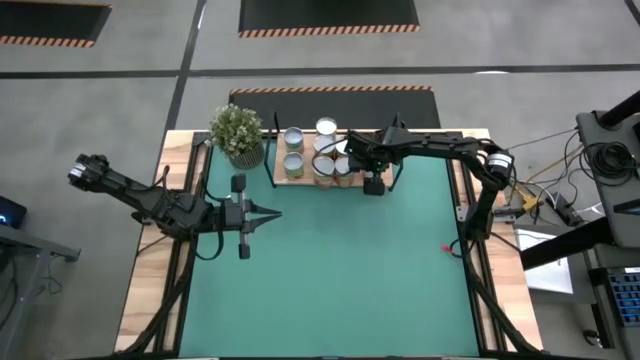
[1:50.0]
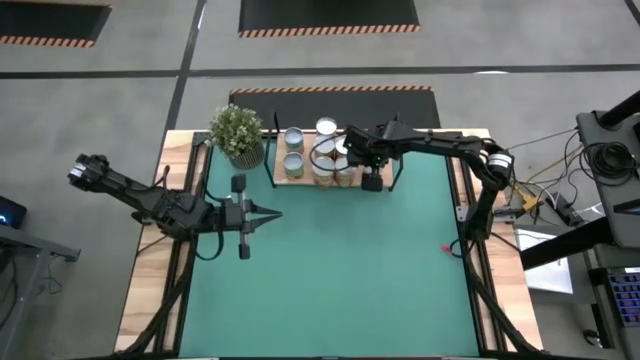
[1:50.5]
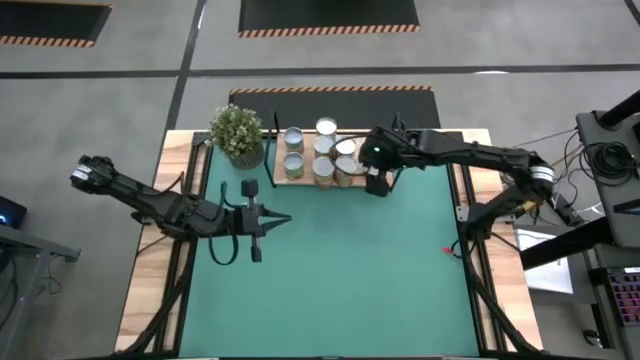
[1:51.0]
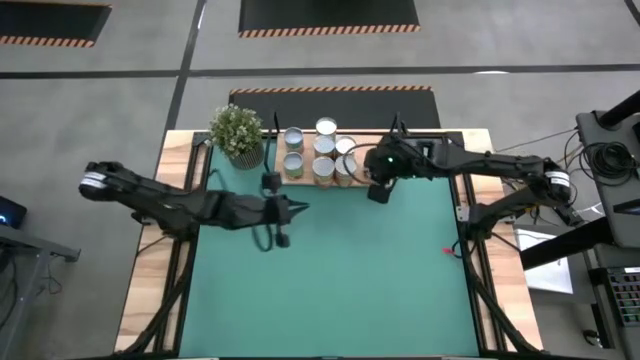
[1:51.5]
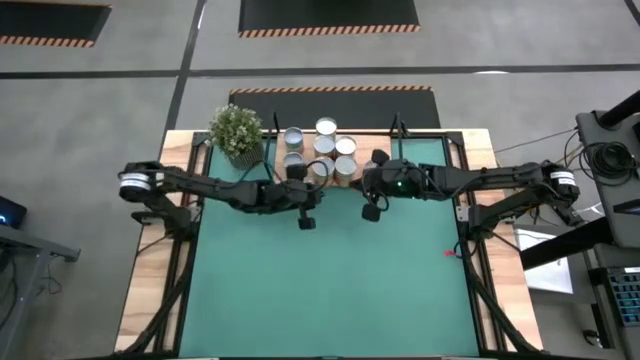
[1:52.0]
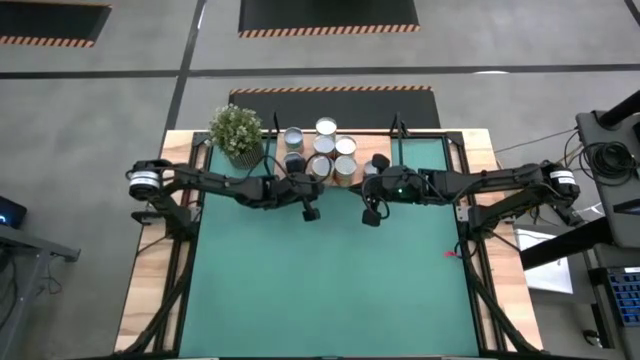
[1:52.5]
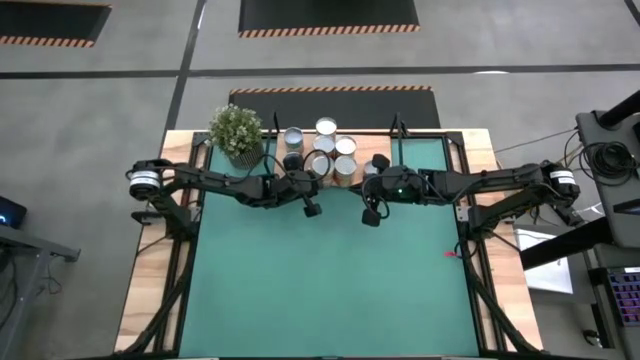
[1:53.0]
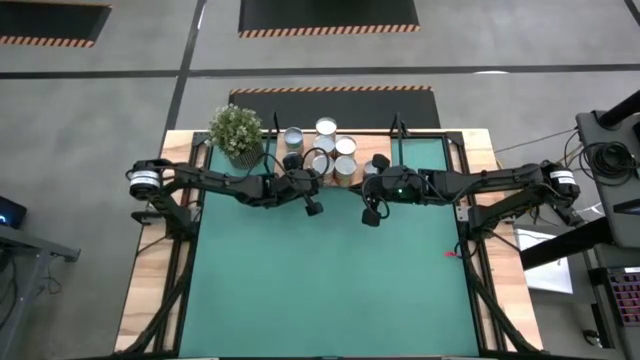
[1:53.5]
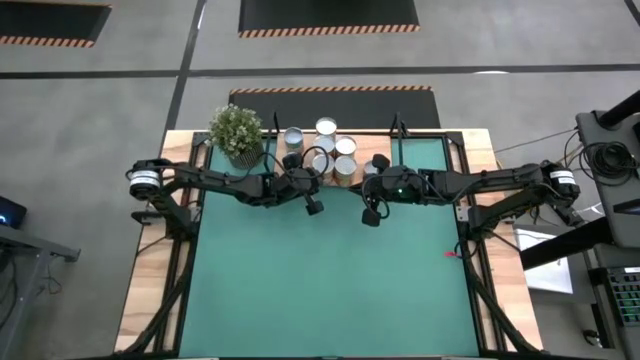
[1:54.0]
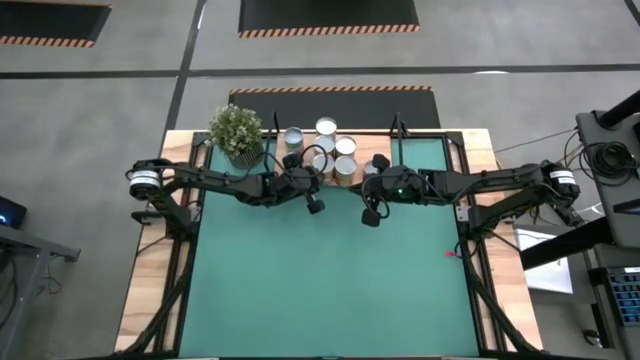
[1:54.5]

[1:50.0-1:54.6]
Task: Pick and place cans onto a shelf
Adjust the canned corn on the shelf

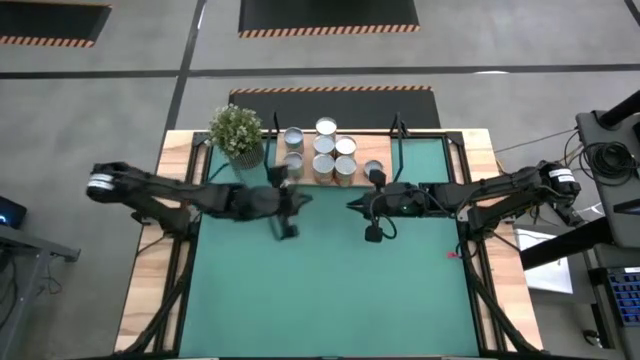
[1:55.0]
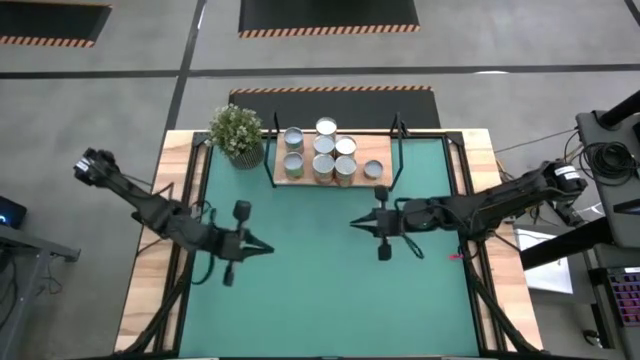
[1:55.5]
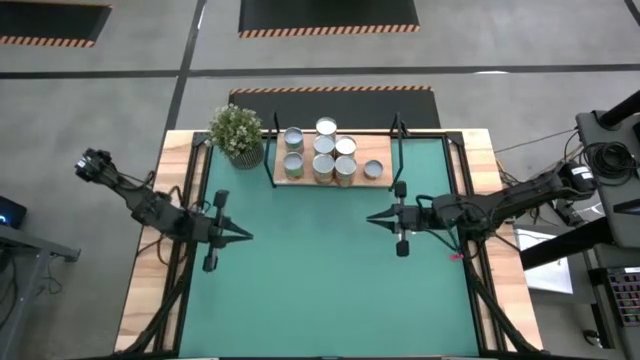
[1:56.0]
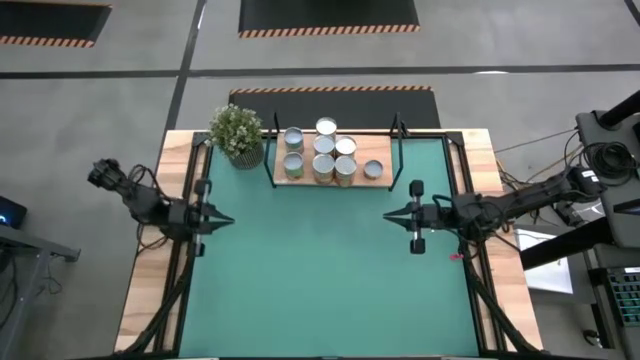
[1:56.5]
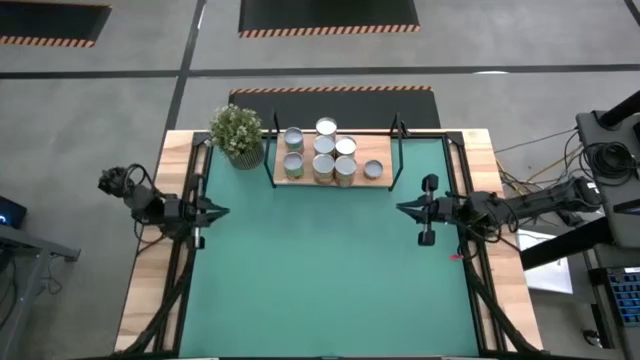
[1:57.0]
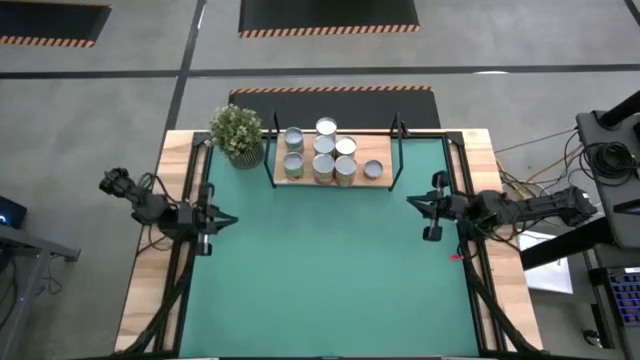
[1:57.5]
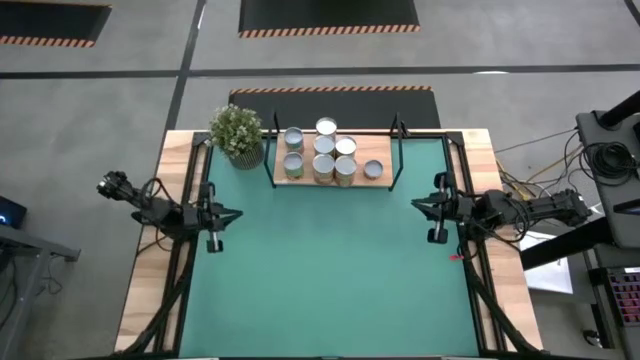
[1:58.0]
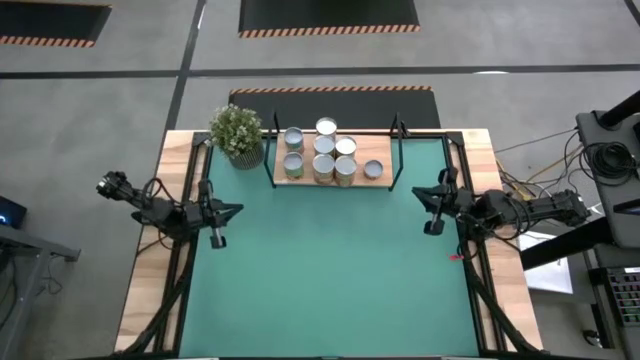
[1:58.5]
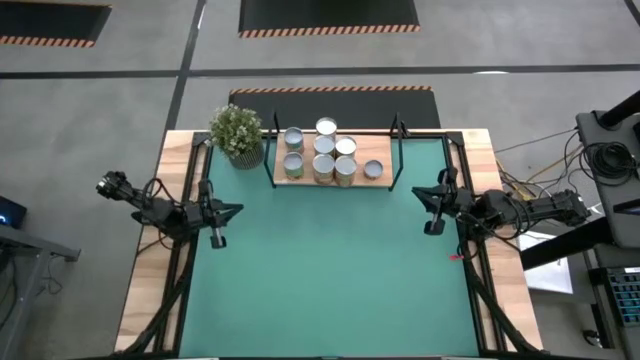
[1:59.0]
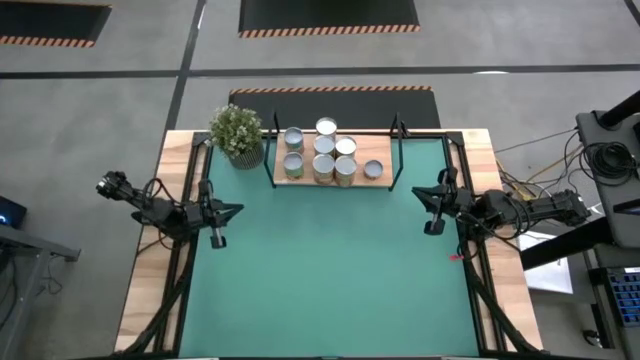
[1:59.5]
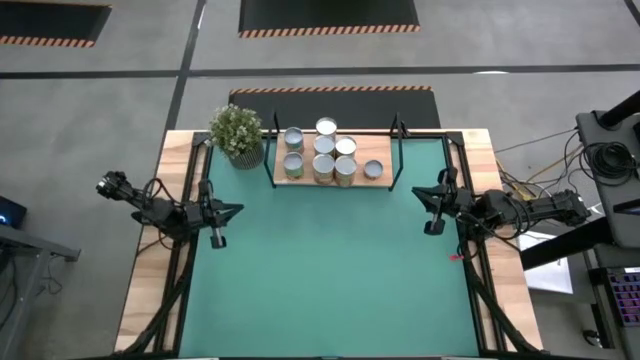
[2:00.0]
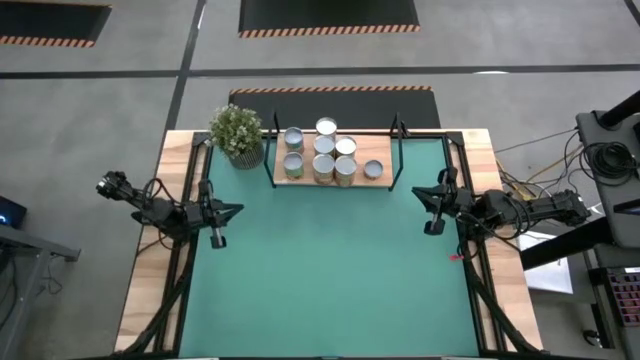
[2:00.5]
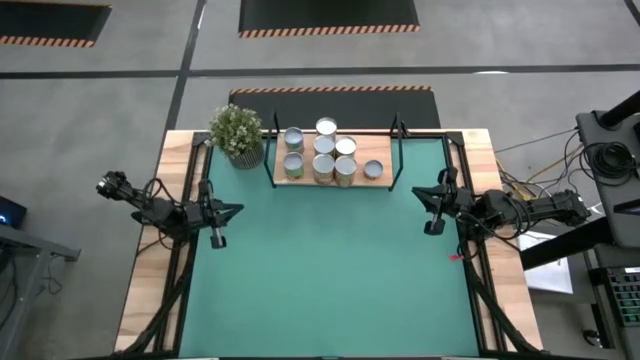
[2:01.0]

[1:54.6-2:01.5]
Return to Home Position

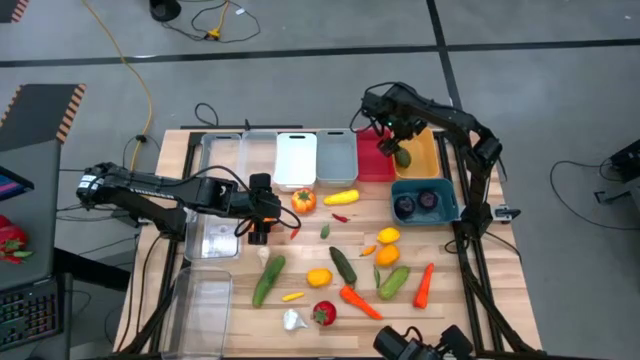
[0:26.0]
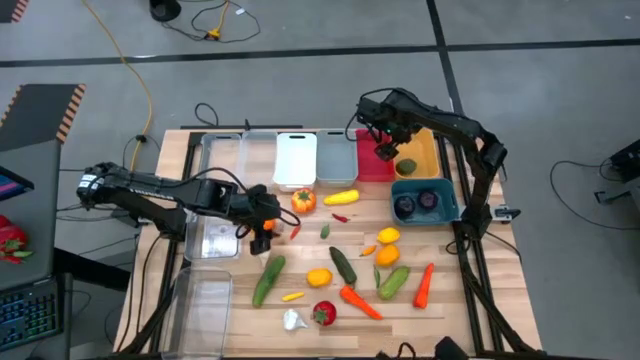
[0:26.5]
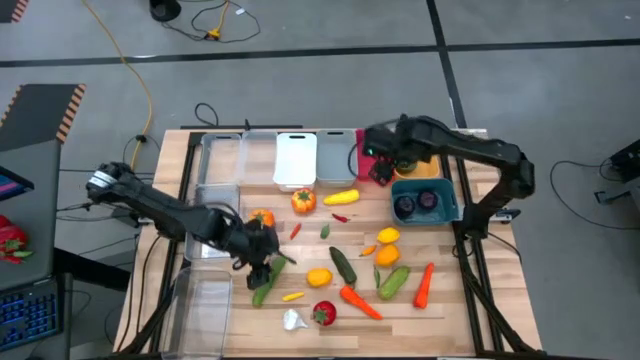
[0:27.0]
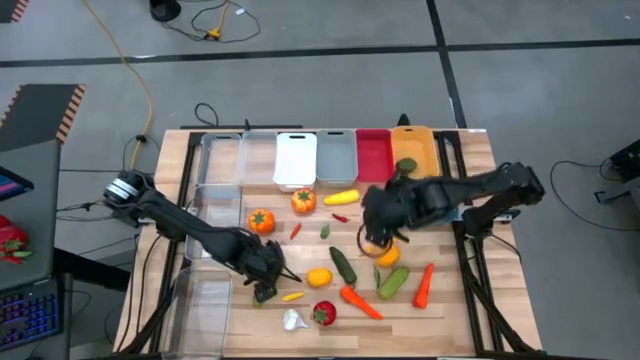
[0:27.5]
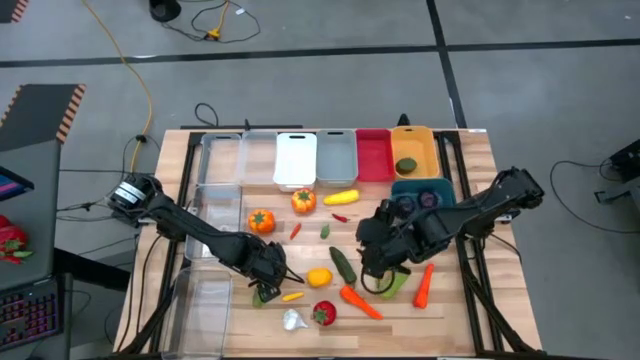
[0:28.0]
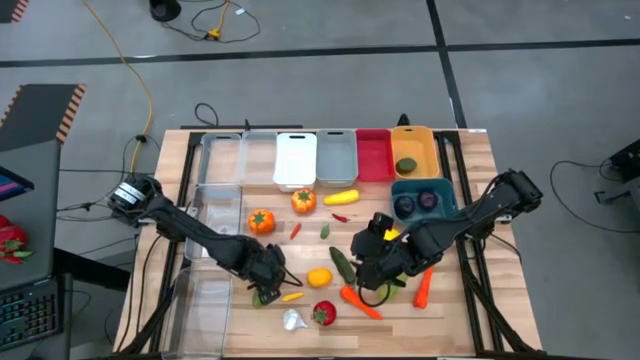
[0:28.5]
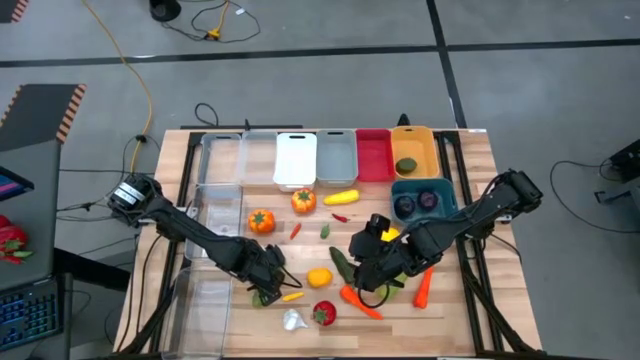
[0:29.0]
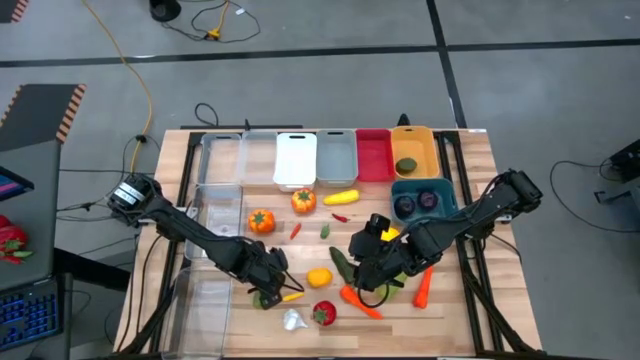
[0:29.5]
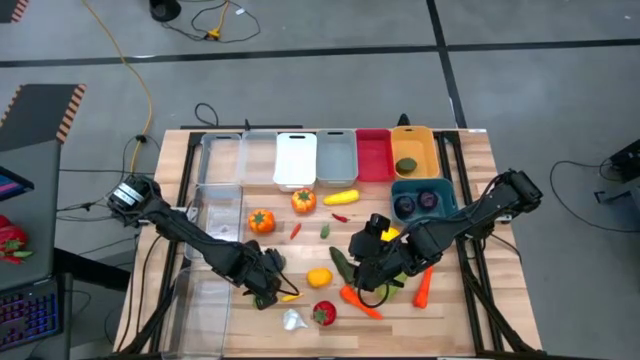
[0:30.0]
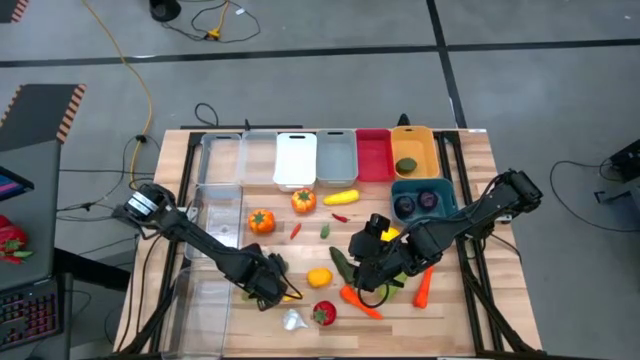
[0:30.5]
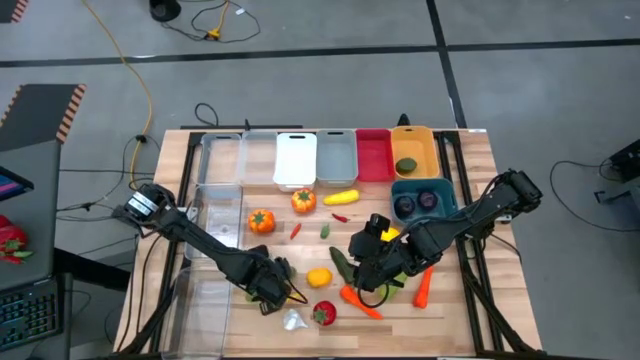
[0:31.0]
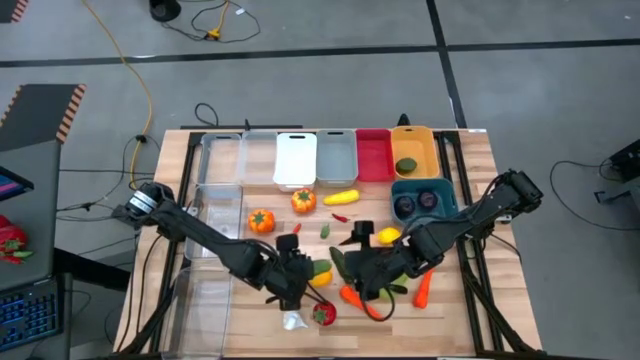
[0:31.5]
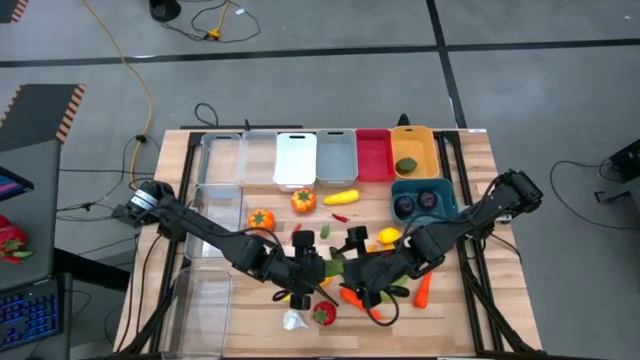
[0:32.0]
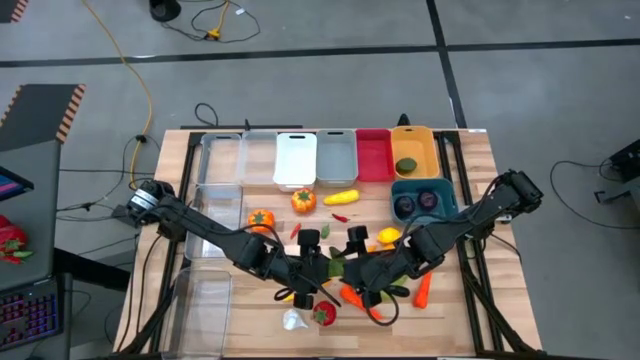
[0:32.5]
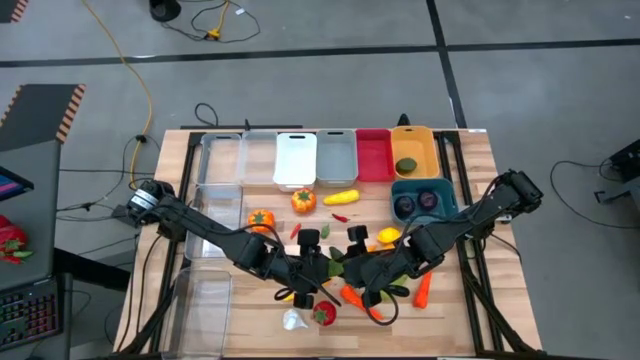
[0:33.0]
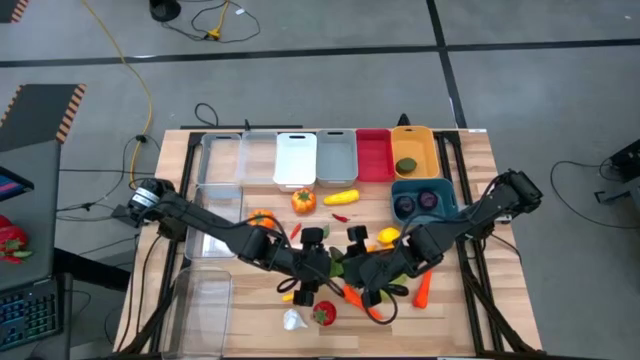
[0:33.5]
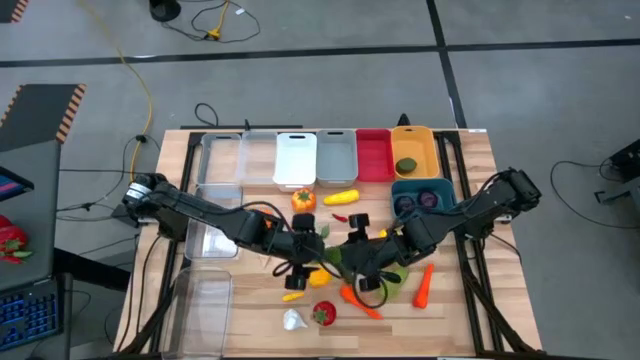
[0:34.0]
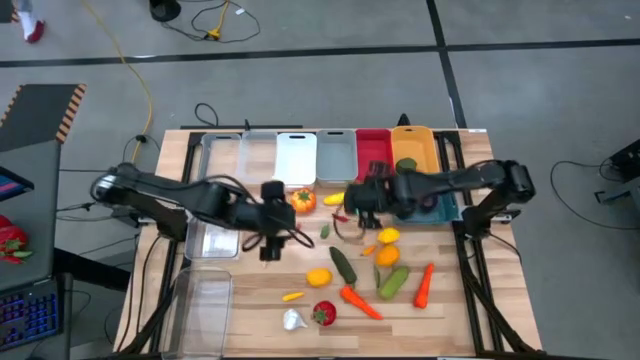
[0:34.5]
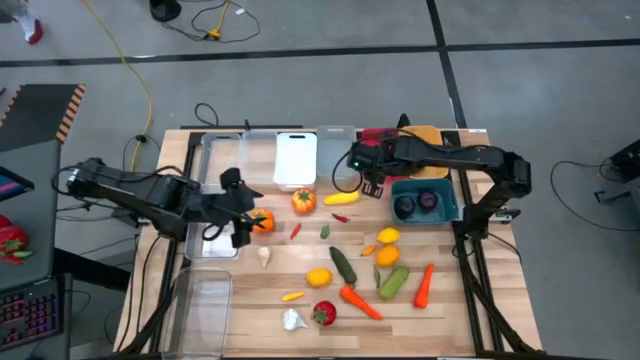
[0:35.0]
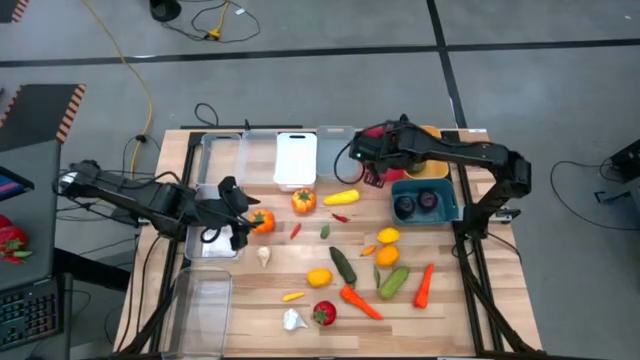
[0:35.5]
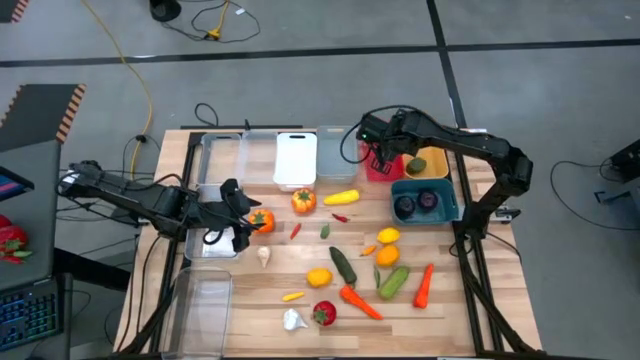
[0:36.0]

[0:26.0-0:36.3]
Task: Sort produce into baskets
Put the left cucumber into the red bin
